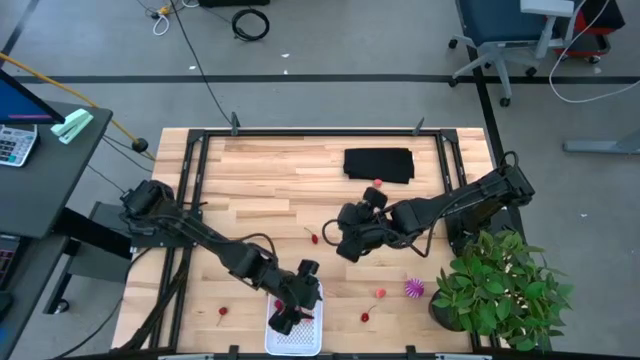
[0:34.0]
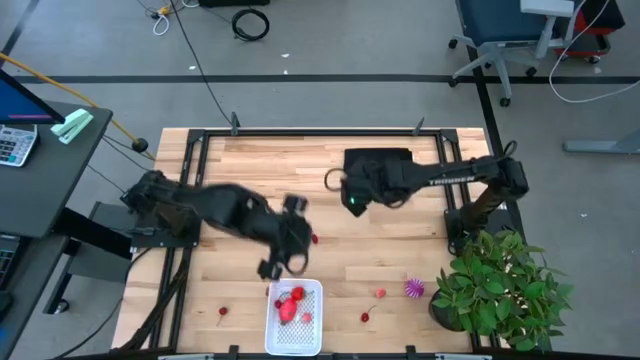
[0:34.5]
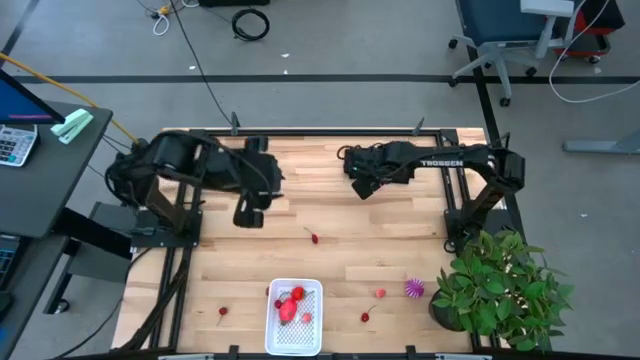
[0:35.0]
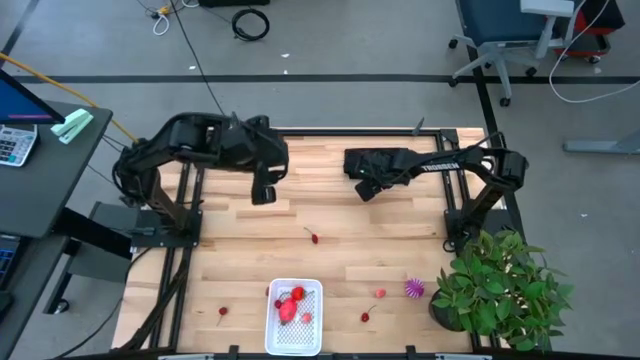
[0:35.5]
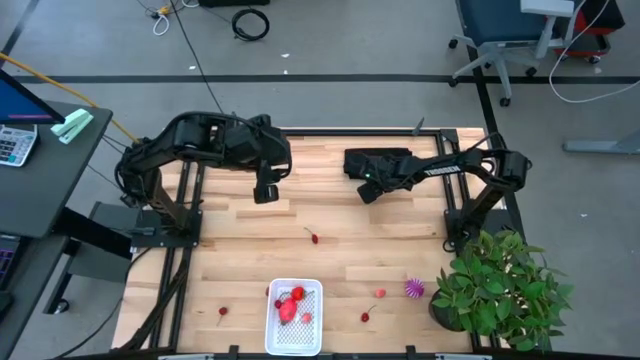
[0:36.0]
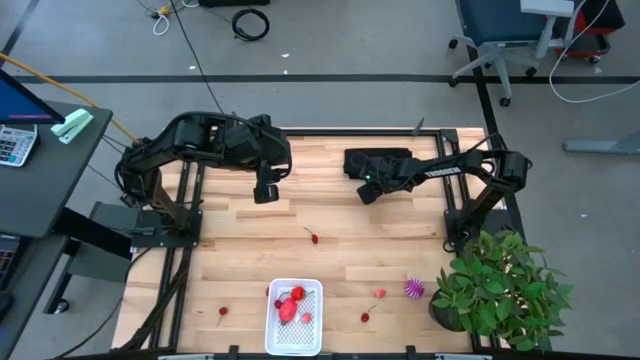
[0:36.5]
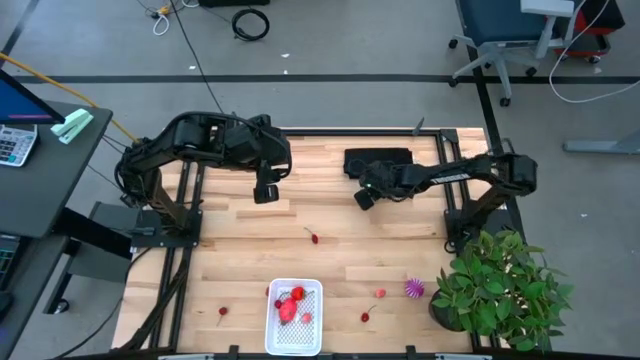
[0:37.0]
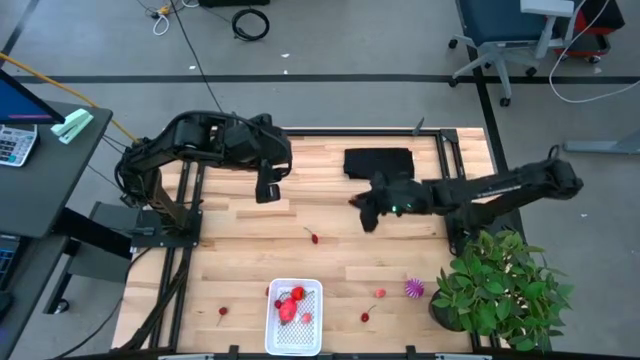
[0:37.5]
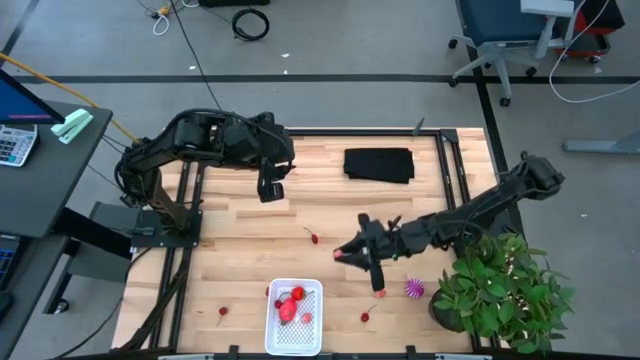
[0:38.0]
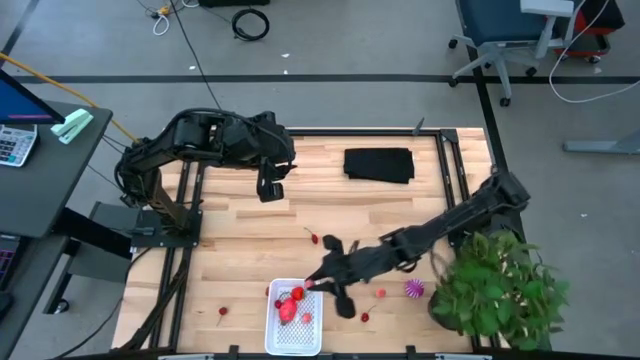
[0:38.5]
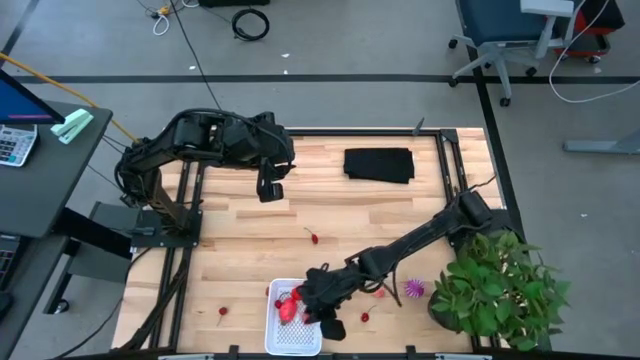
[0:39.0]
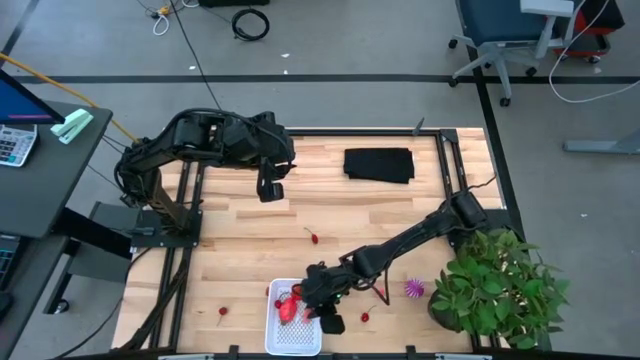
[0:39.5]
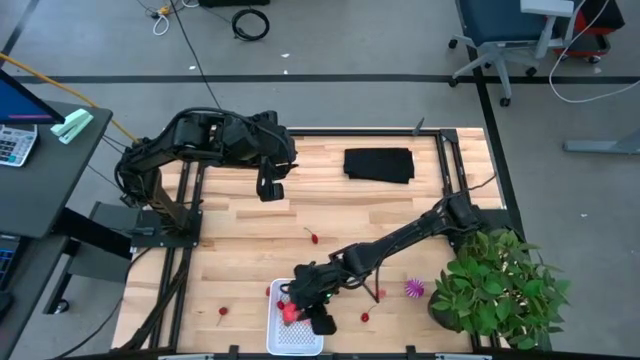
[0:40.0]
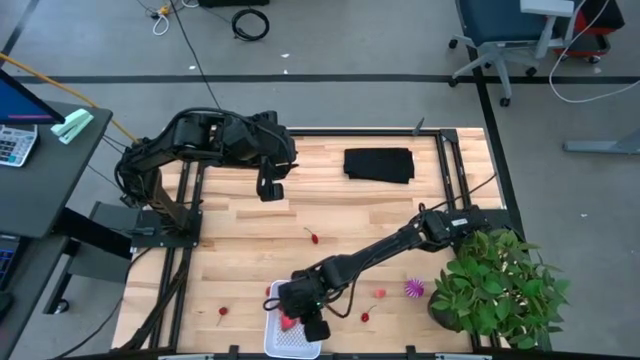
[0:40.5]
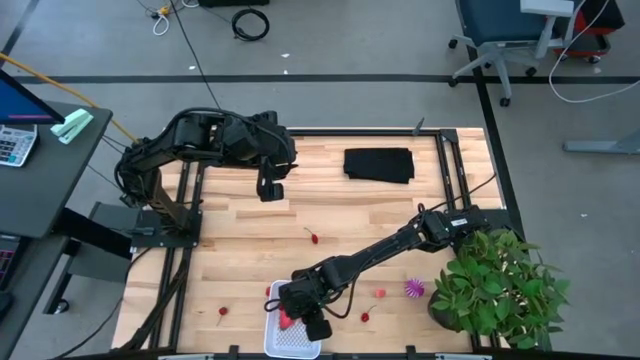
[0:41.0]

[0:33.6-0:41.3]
Task: Pick and placing Produce into tupperware
Put the top lychee into the white basket

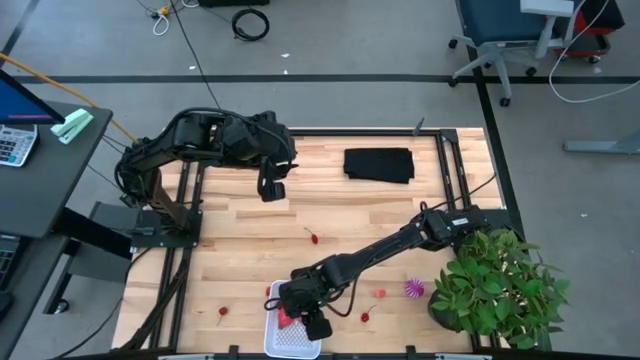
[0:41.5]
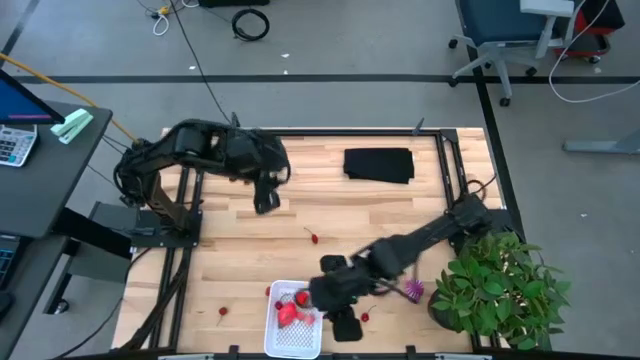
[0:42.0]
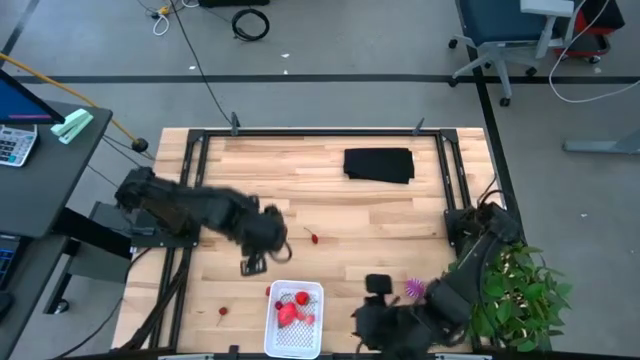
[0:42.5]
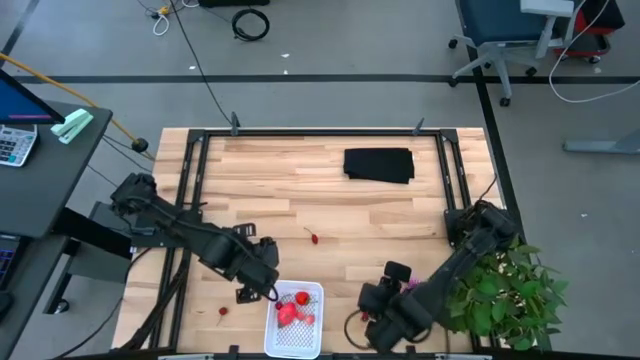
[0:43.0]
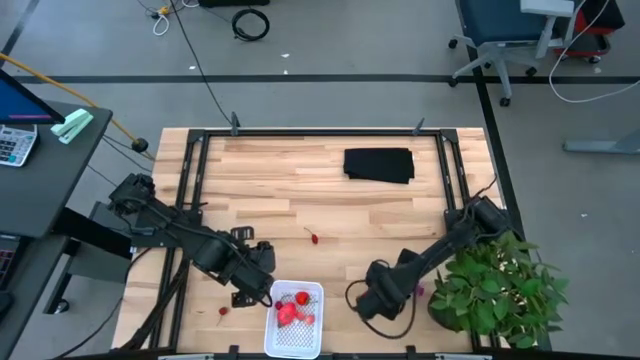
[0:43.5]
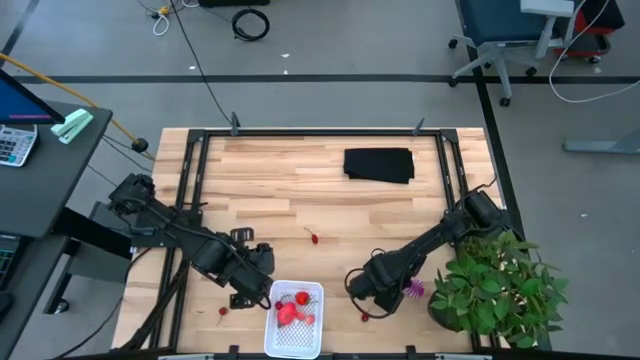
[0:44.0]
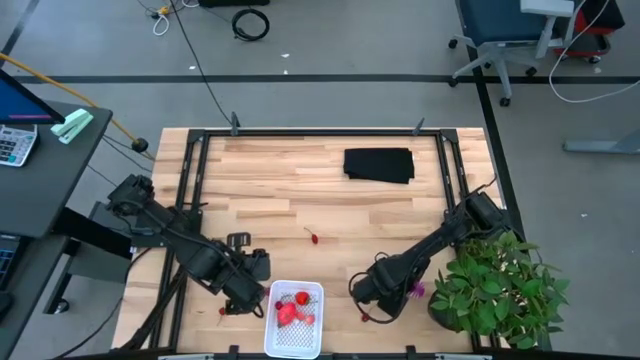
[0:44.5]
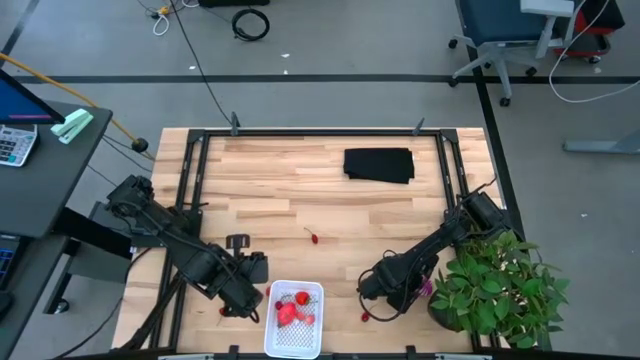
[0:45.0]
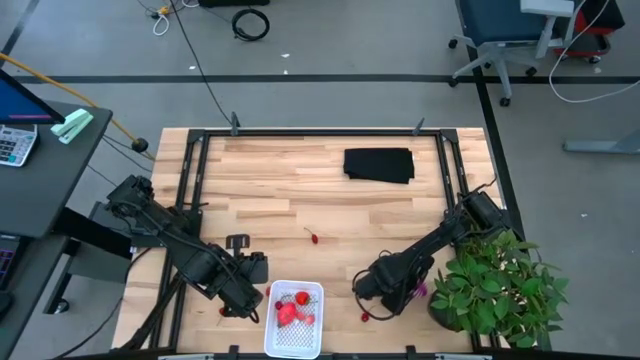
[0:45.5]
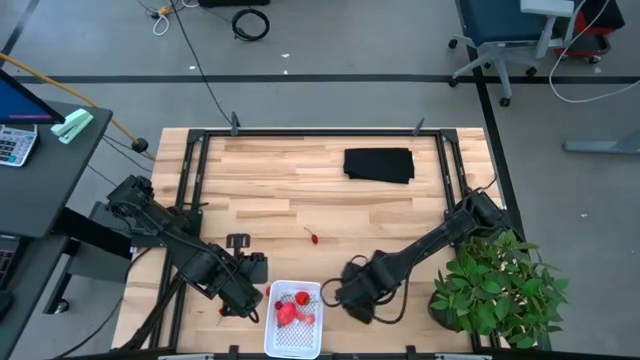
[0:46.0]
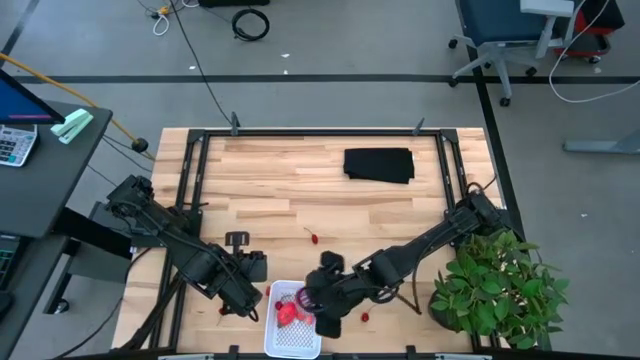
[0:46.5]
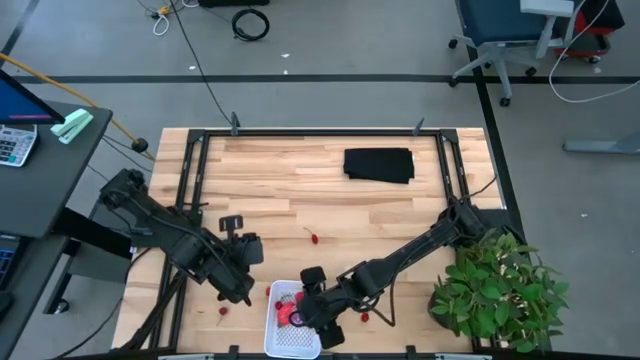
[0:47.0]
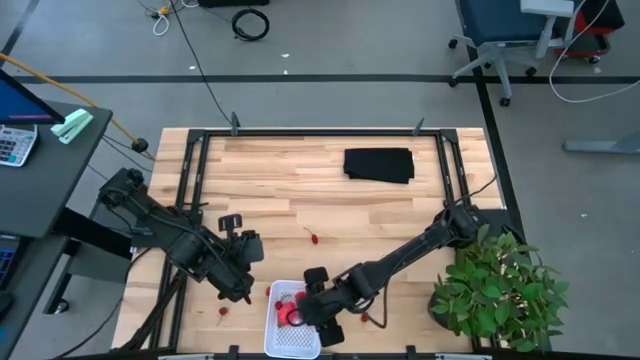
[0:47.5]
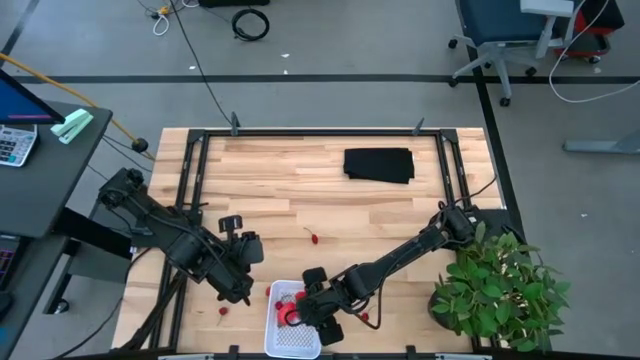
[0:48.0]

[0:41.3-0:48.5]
Put the onion into the white basket

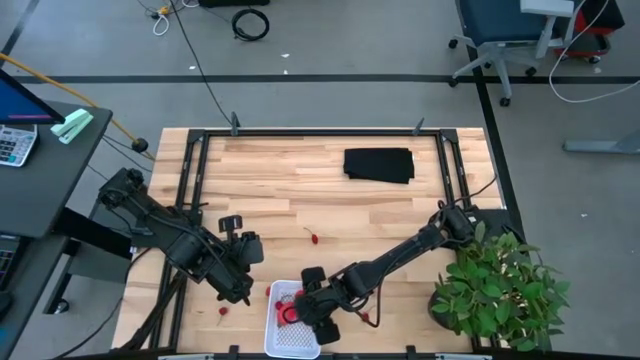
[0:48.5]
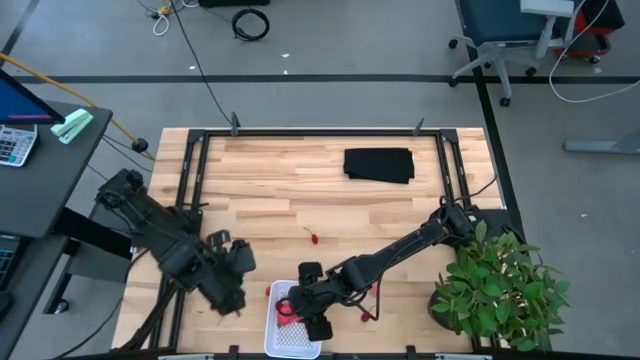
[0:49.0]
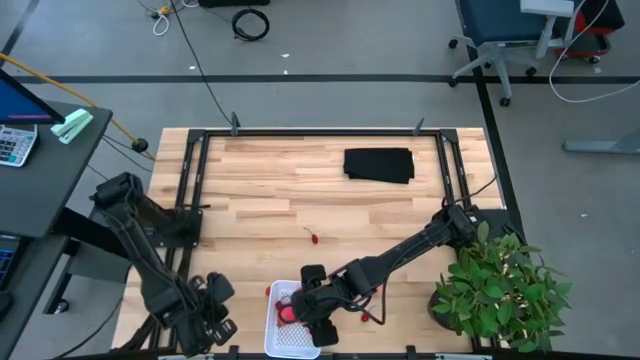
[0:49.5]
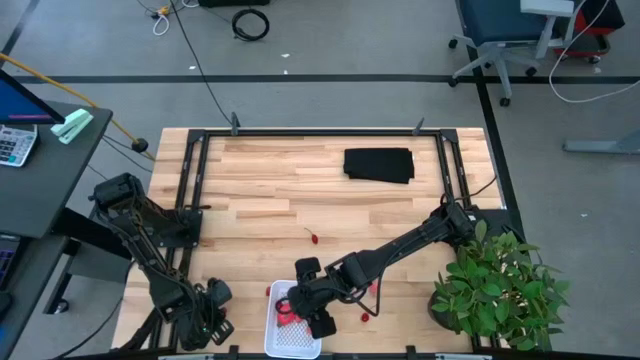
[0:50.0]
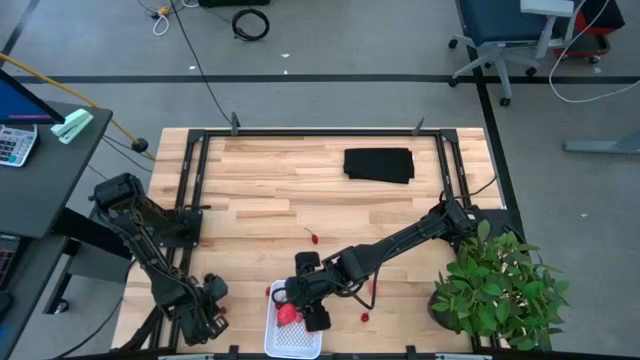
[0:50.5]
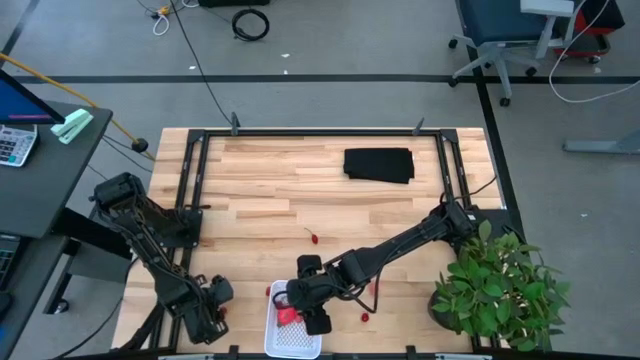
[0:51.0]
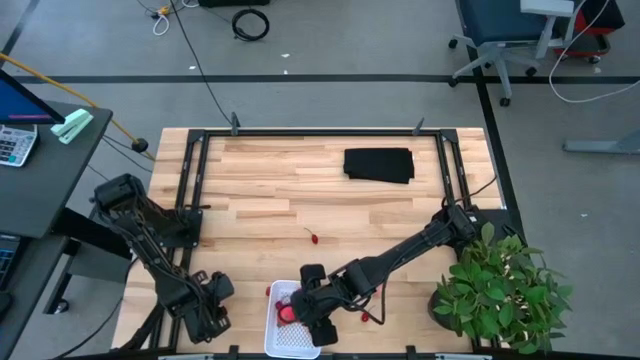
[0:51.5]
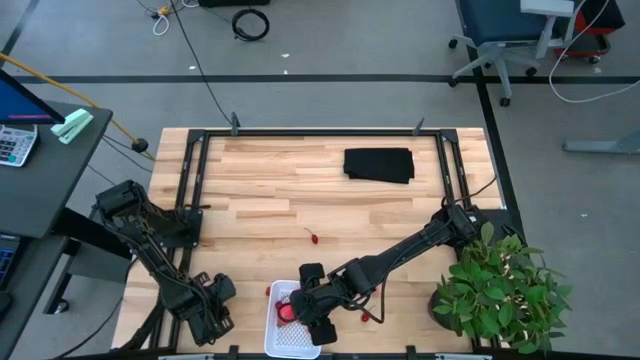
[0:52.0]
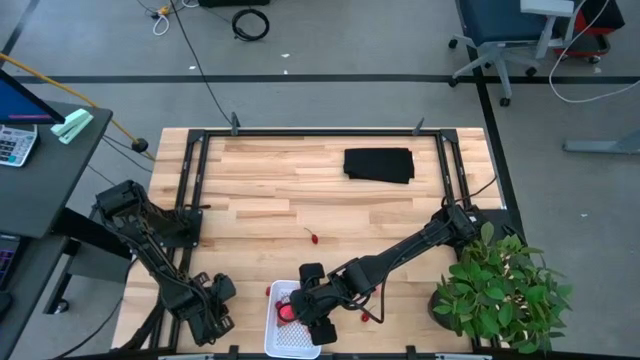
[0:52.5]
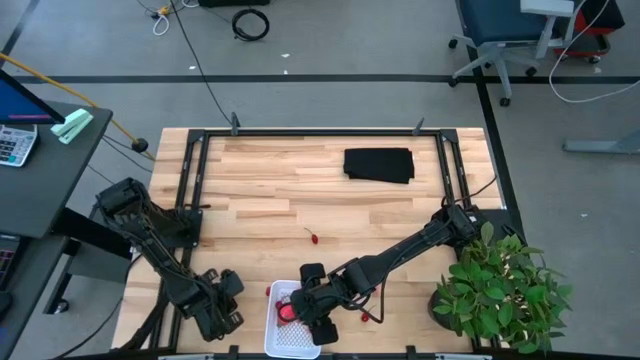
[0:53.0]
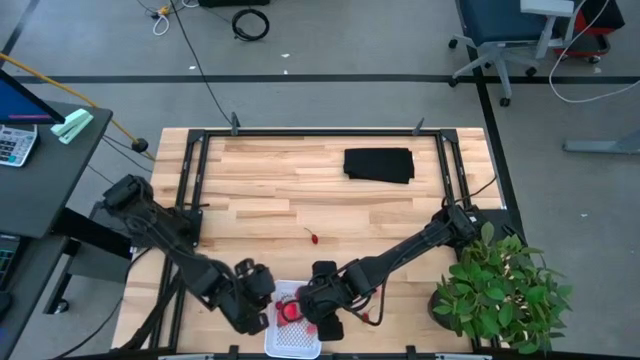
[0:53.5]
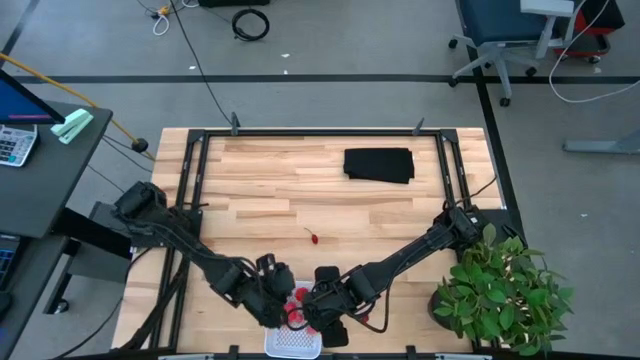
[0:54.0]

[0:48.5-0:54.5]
Put the left cherry into the white basket

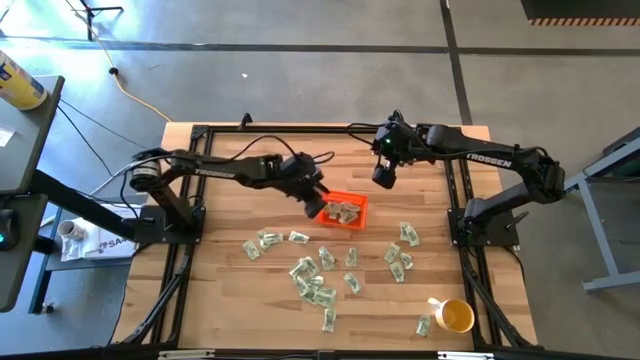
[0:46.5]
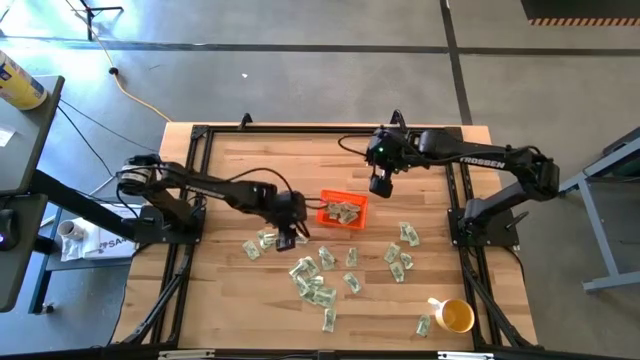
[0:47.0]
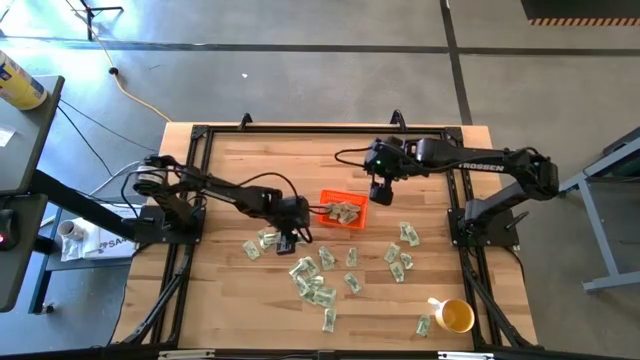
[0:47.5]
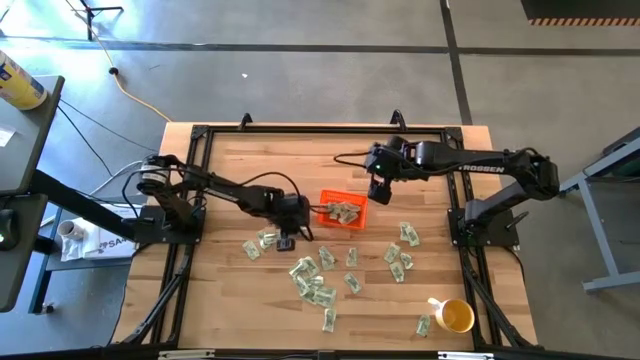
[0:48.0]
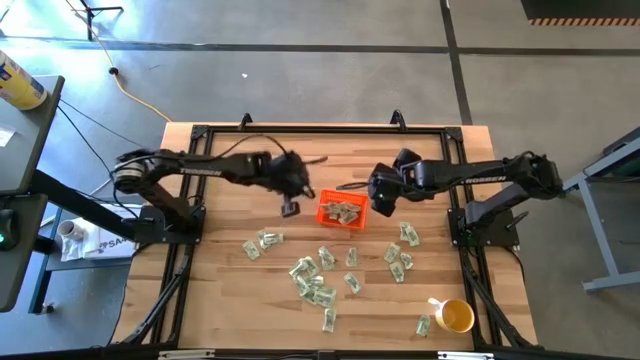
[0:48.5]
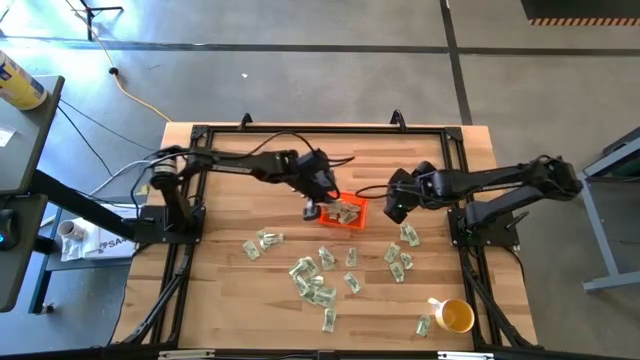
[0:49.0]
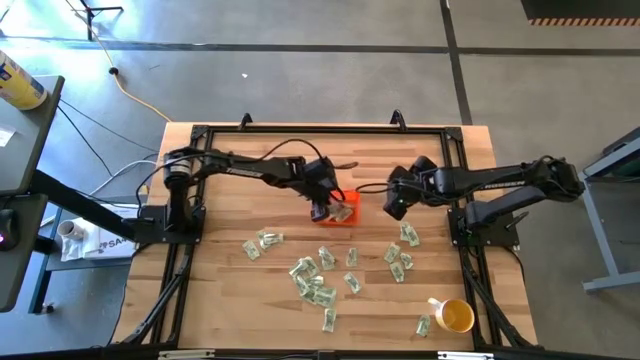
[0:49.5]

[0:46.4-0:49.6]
Task: Pick and place Stevia / Truvia into bins
Put the stevia packet into the orange bin
